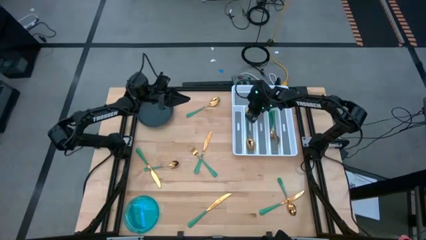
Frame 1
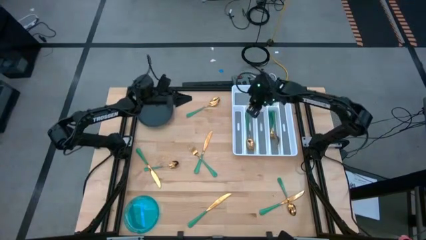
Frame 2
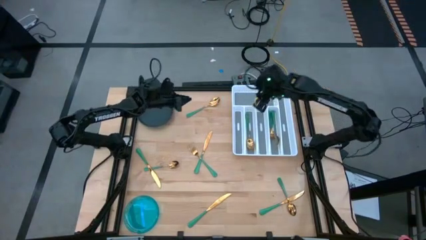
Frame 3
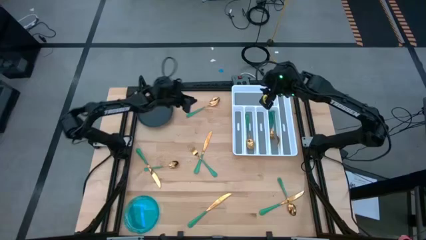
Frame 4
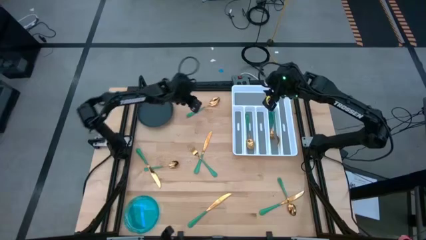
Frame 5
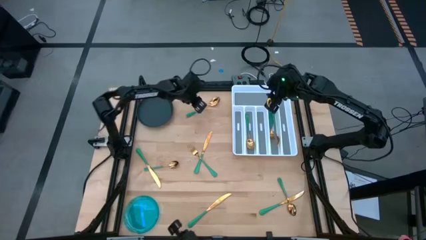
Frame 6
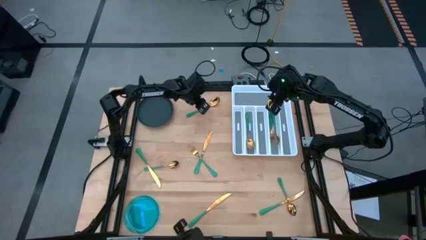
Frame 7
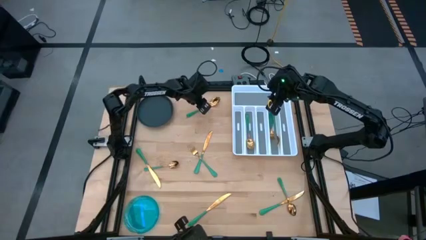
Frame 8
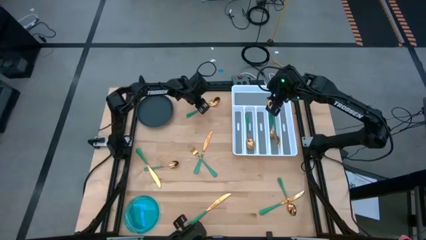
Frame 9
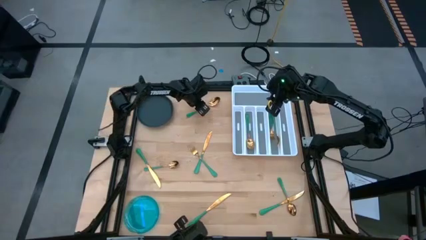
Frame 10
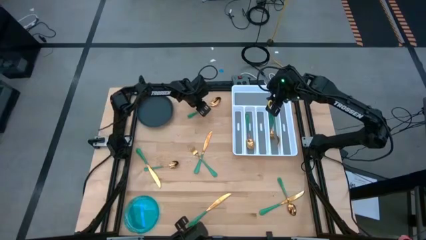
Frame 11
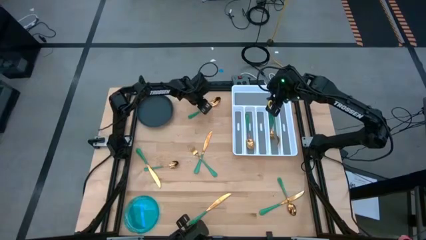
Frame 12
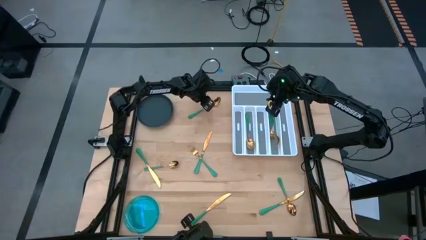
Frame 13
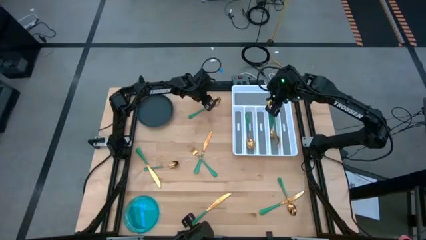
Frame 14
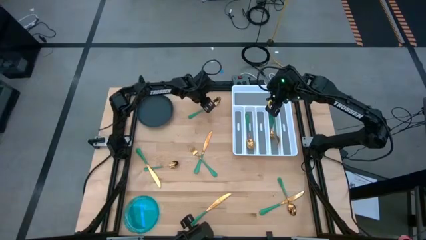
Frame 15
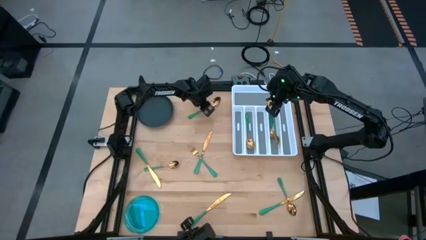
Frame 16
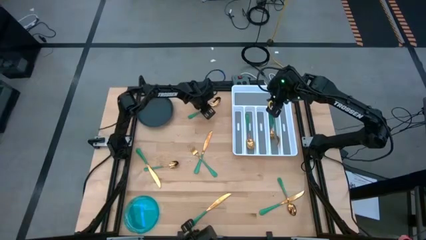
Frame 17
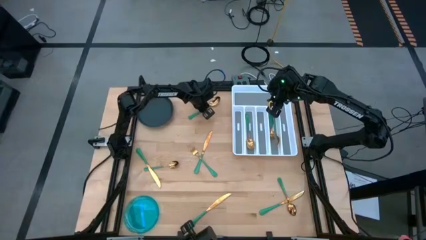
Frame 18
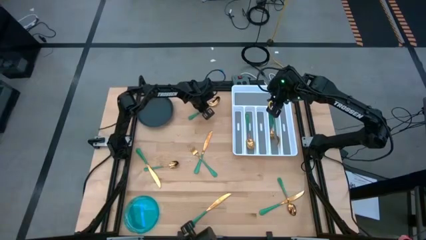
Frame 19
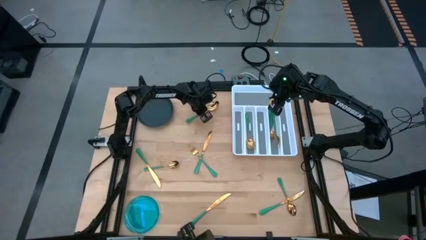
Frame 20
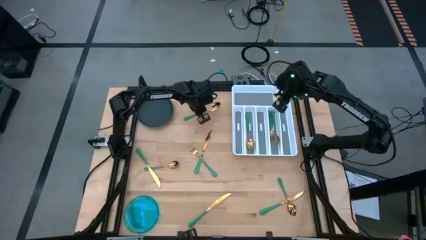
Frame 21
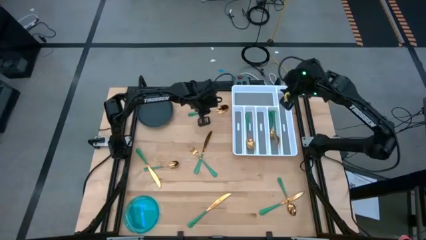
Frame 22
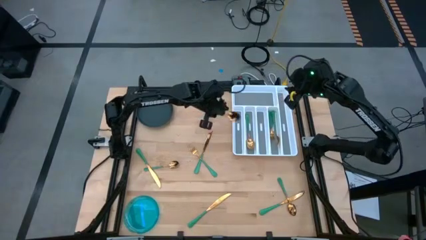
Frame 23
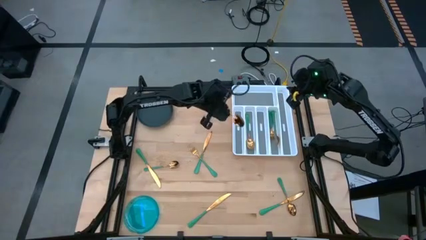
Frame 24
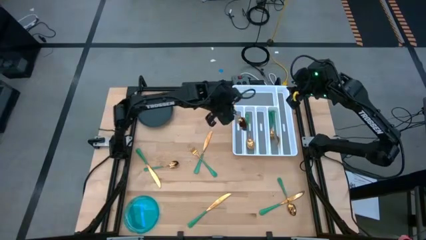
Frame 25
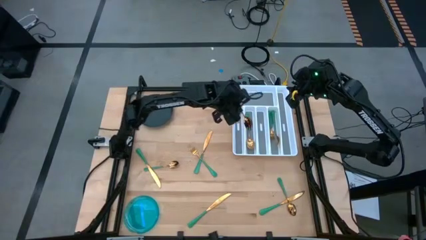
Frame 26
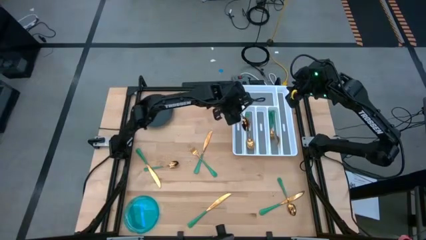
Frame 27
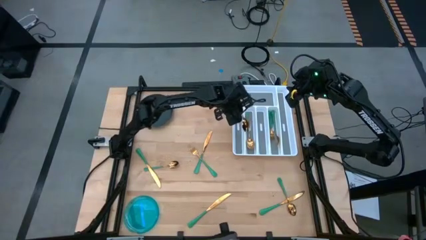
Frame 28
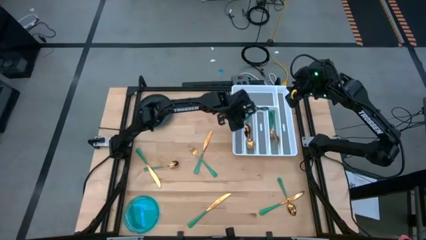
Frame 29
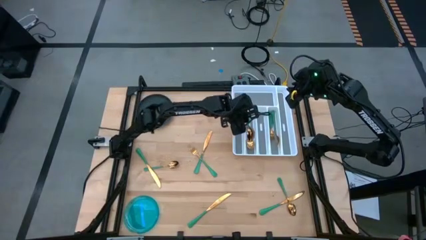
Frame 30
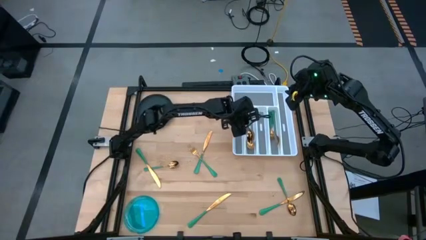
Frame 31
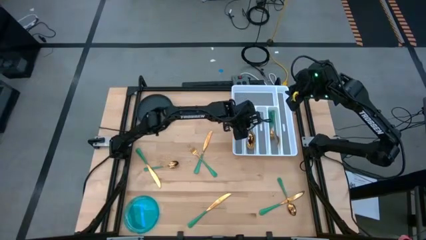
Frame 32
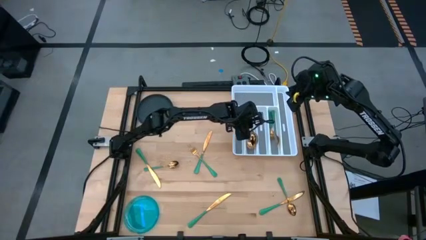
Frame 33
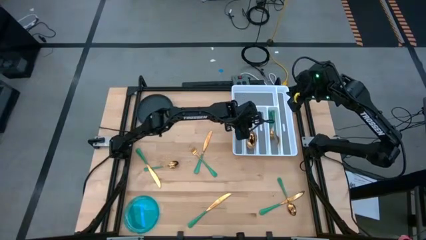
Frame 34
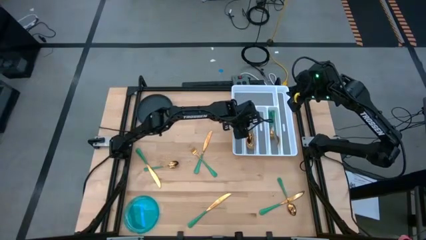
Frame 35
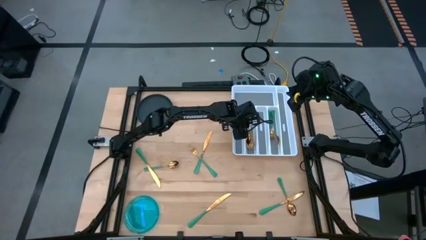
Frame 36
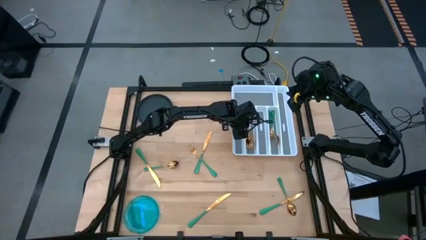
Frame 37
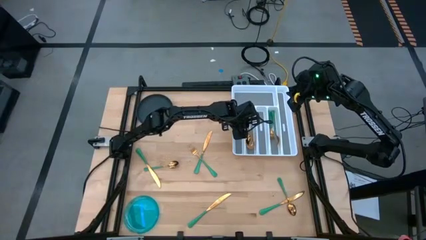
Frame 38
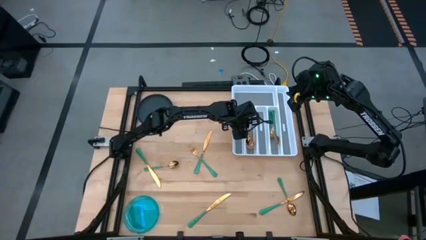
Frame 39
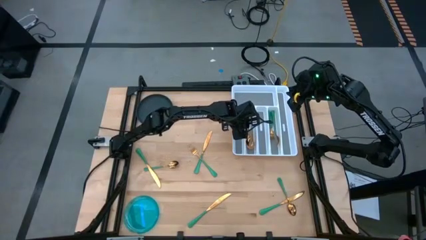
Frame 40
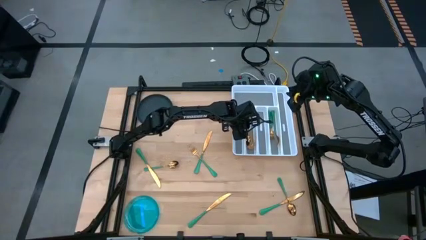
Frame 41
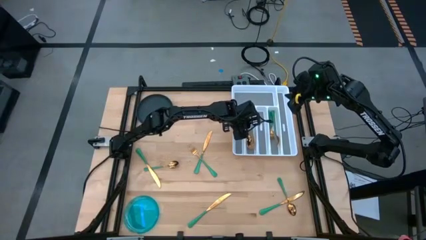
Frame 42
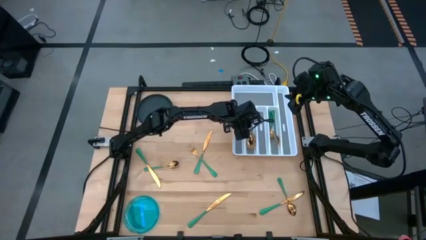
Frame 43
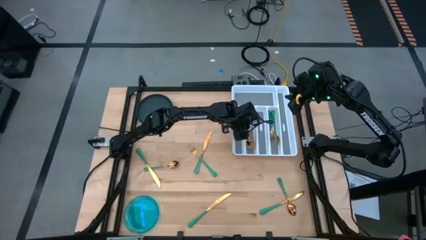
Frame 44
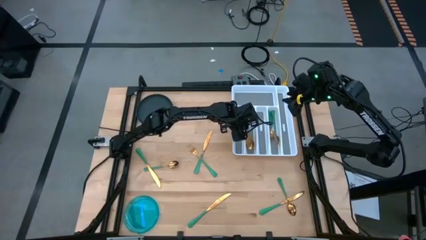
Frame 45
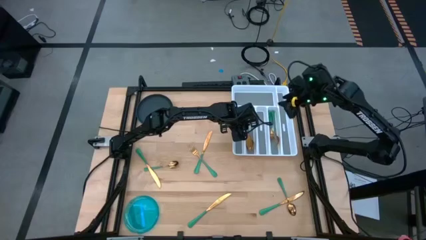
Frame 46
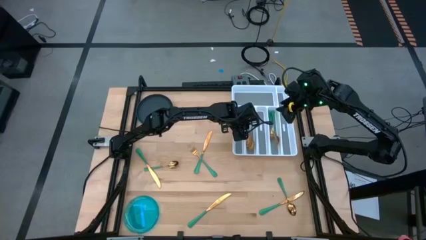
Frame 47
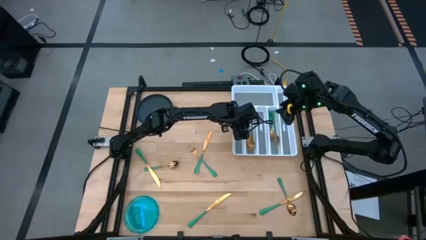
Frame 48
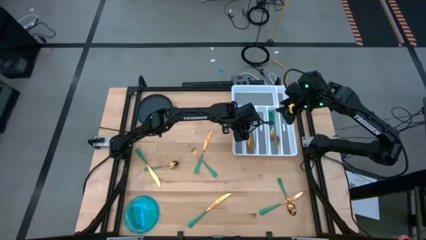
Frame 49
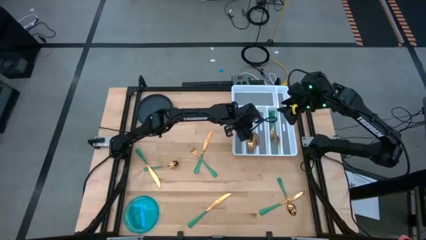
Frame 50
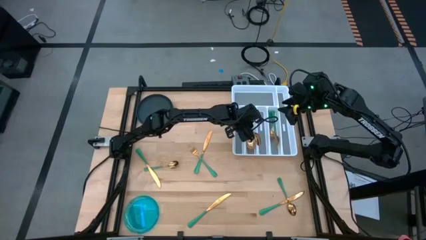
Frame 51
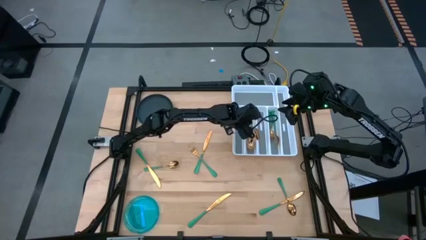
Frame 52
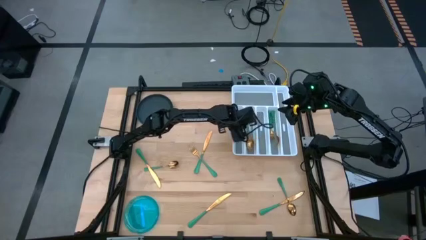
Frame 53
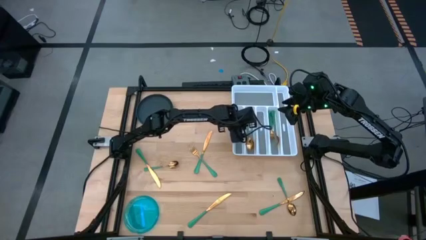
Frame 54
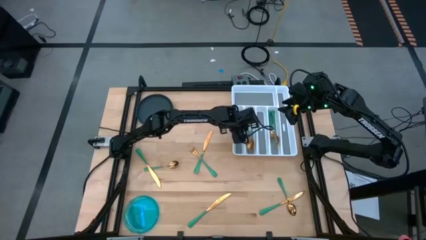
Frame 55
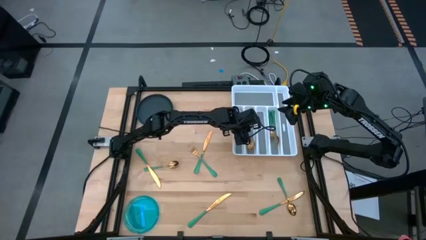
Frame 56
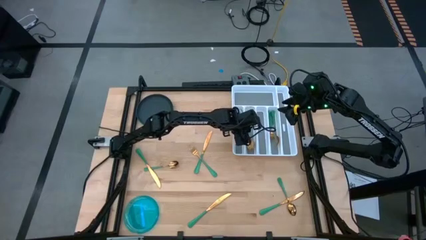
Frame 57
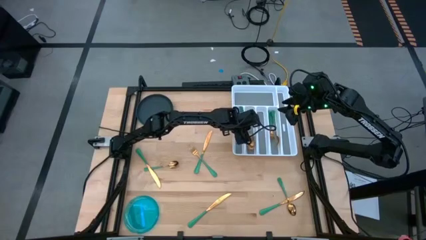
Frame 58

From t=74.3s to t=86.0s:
Task: Sort silverware
Put the top green spoon into the silverware tray
